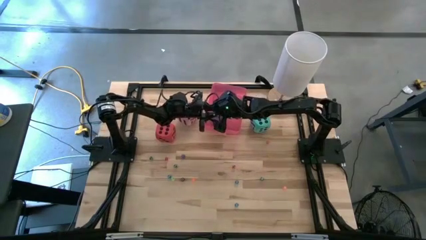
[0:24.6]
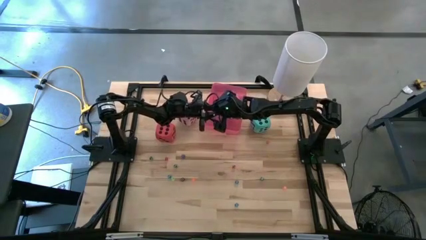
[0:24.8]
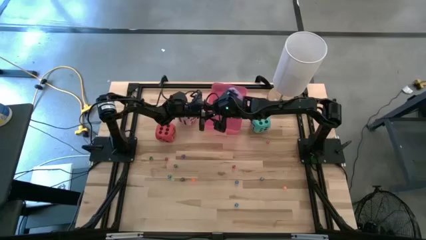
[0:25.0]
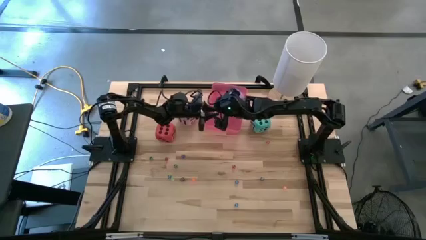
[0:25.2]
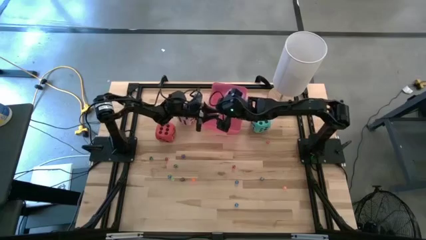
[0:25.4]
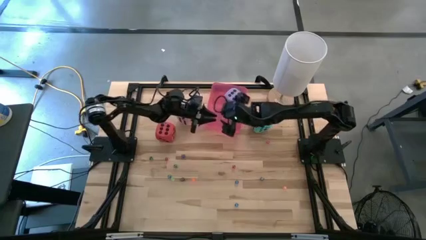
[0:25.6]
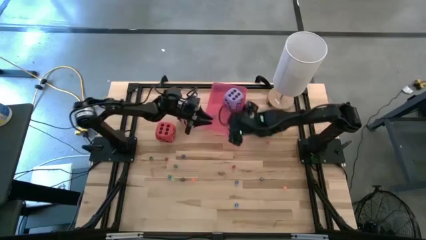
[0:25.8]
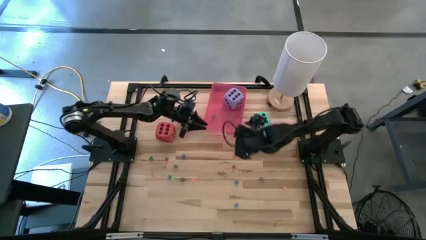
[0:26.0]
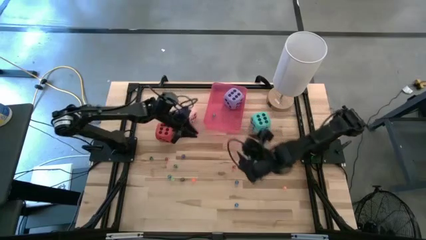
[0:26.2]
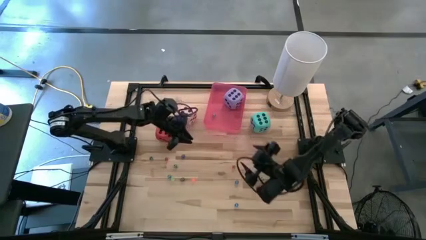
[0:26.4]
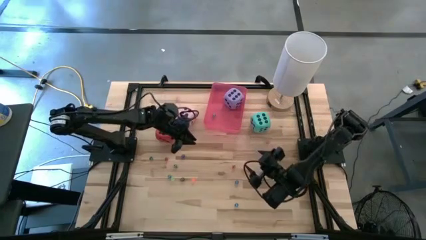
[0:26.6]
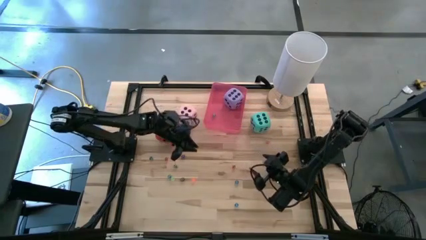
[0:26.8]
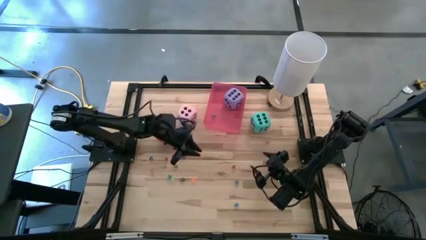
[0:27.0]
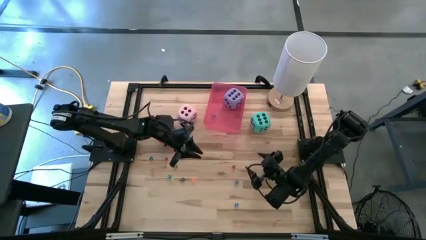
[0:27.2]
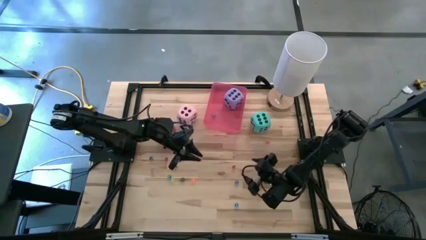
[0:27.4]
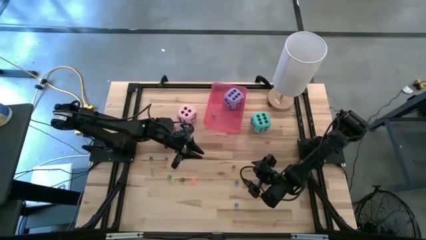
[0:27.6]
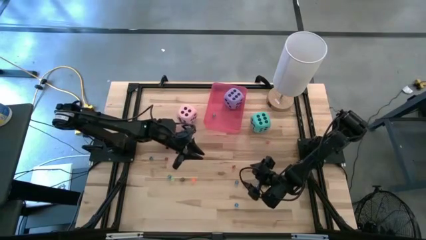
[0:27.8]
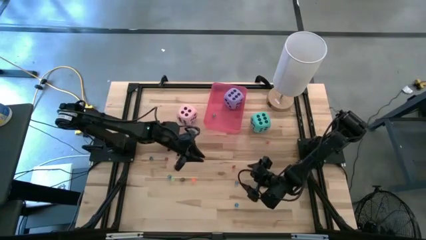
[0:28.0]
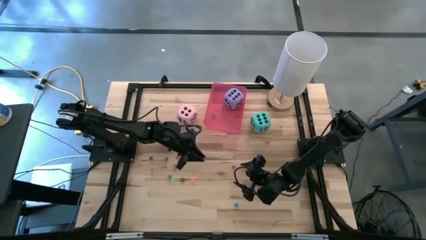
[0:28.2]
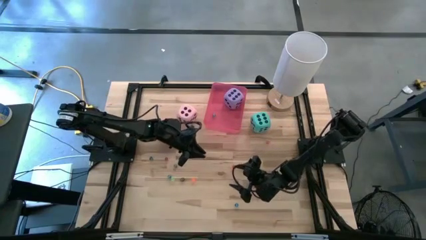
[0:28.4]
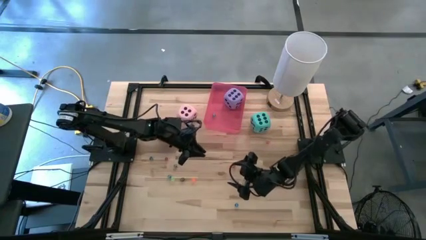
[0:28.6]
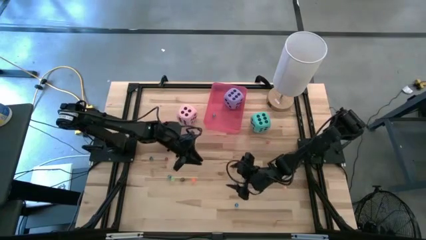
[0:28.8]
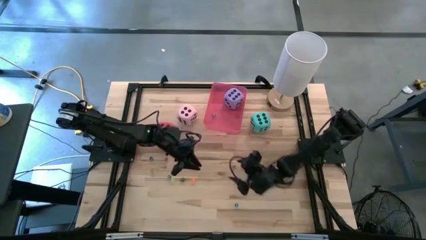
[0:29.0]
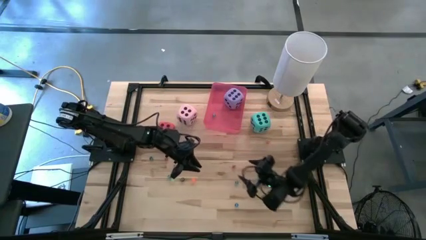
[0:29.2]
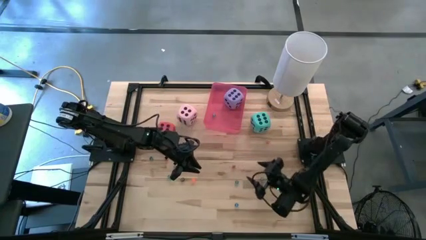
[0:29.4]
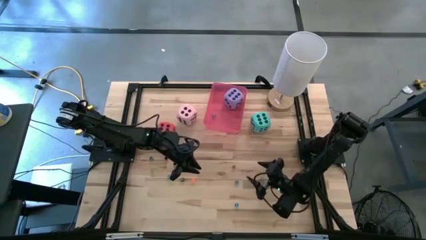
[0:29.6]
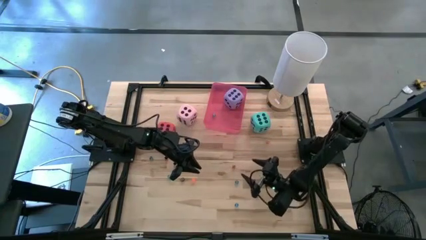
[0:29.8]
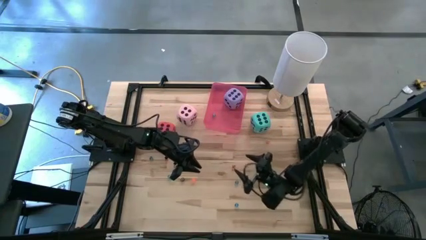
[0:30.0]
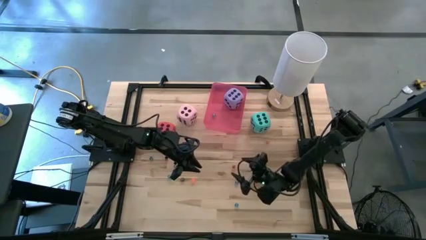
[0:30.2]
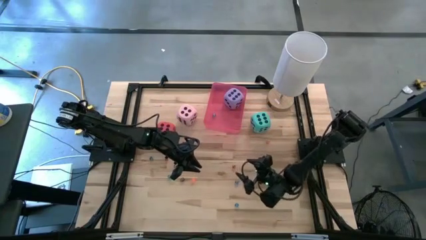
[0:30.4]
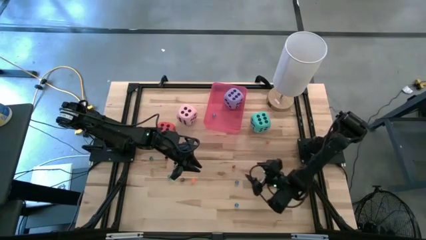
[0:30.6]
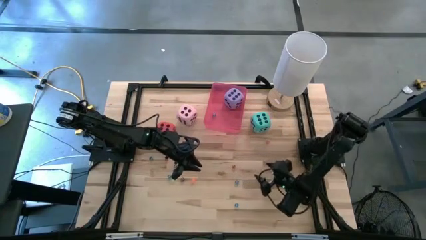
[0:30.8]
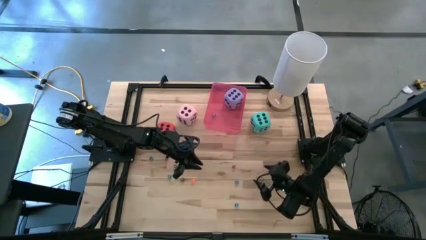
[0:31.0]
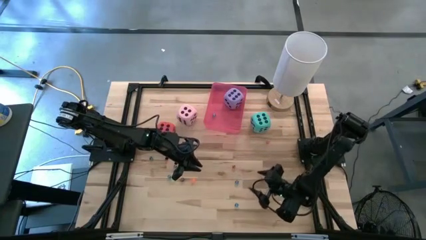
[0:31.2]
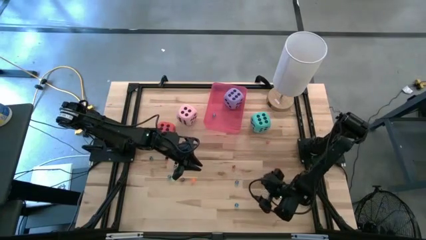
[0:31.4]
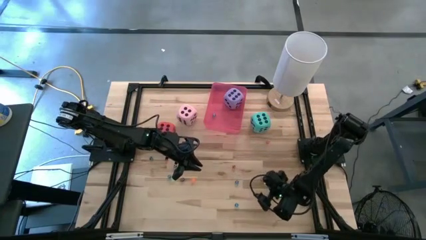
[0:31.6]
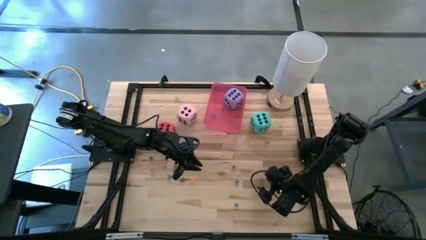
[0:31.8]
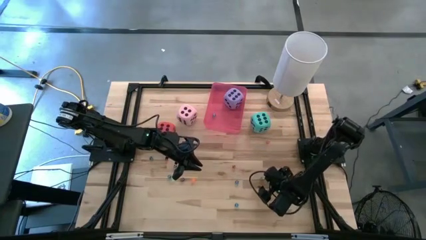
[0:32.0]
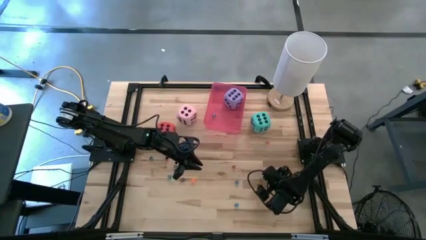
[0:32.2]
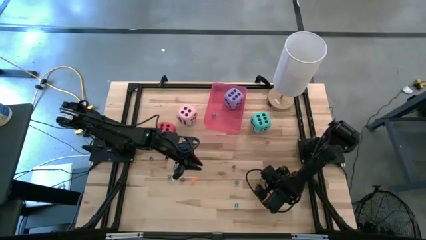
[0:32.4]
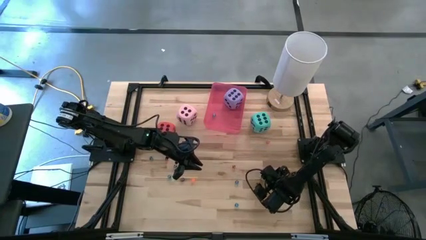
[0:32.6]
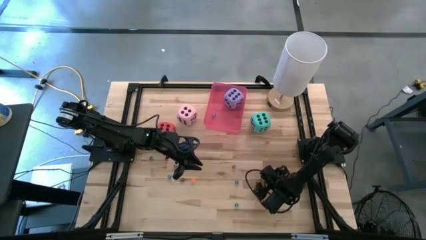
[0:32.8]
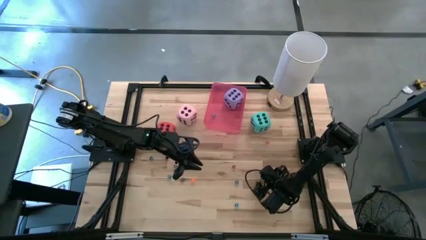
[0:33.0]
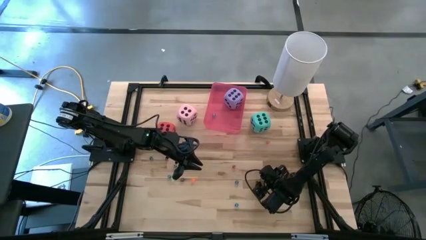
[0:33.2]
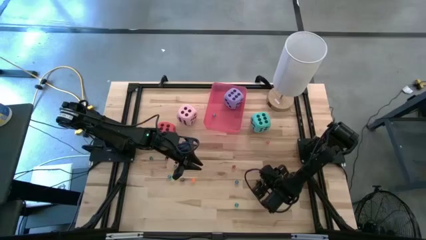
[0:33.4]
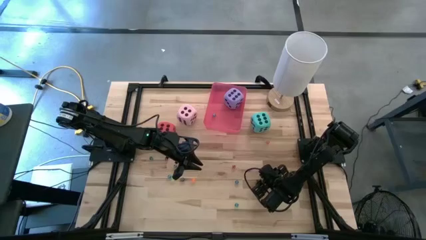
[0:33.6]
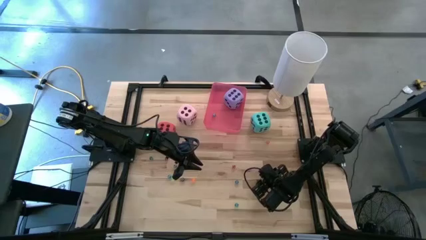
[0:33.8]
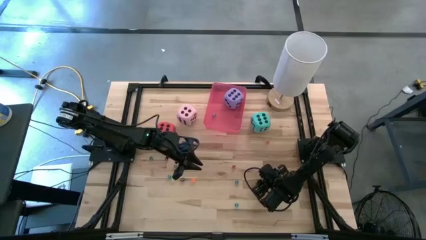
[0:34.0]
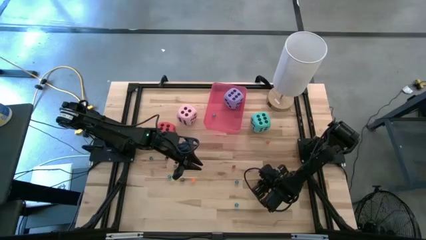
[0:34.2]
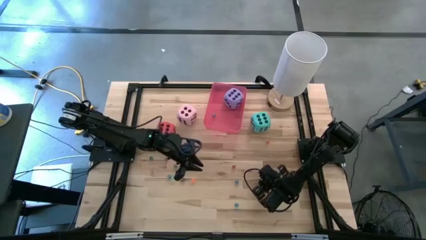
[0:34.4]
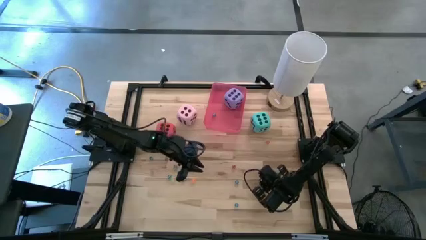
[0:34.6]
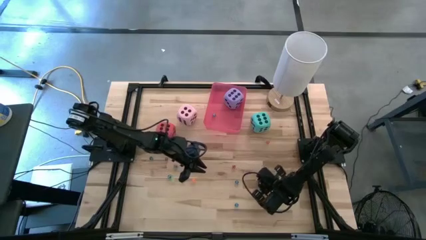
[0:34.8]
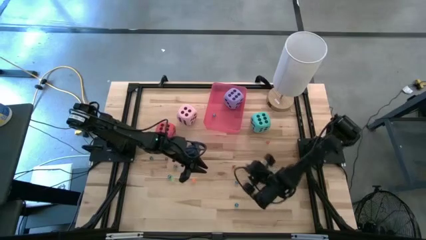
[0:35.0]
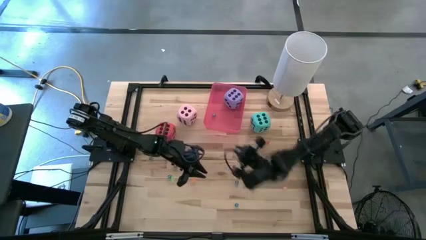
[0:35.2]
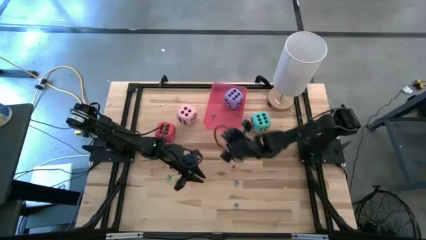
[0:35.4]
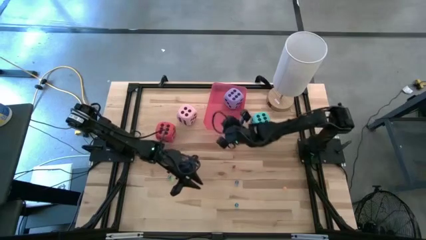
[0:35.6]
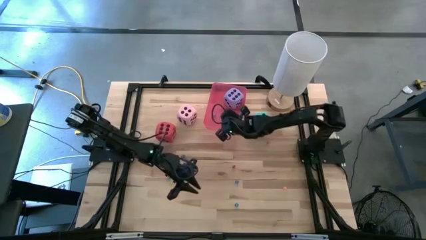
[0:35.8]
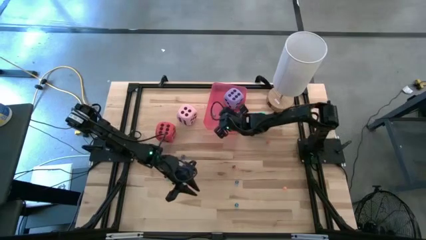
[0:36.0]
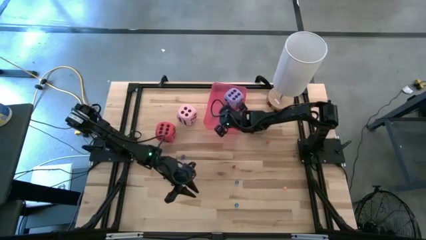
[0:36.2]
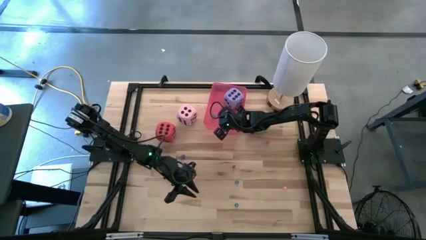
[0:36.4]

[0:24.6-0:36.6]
Task: Pick & Place Dice
Put the right small green dice into the bin
